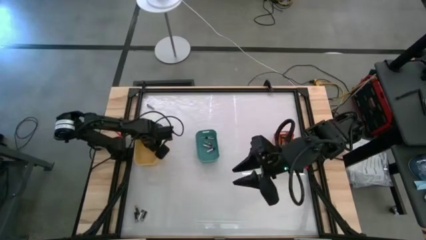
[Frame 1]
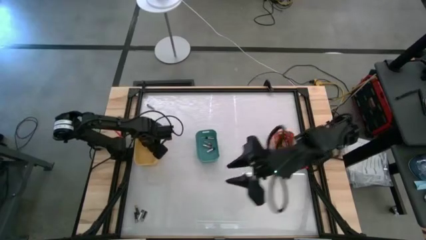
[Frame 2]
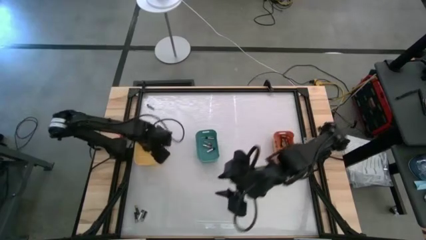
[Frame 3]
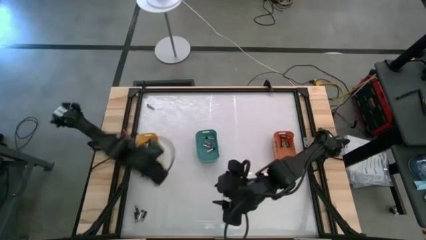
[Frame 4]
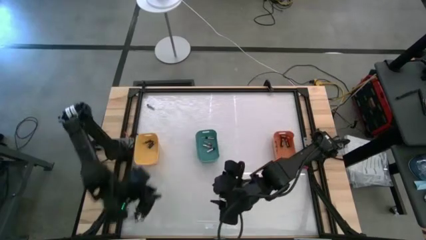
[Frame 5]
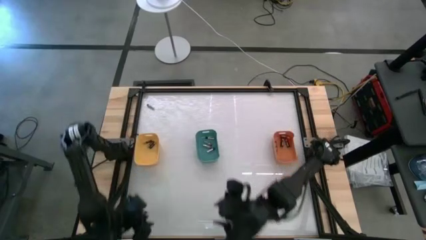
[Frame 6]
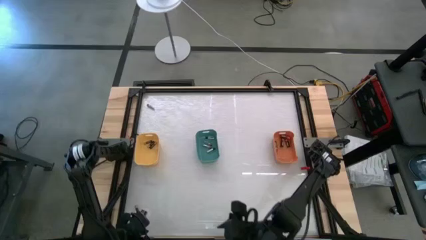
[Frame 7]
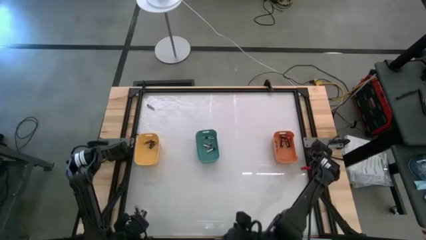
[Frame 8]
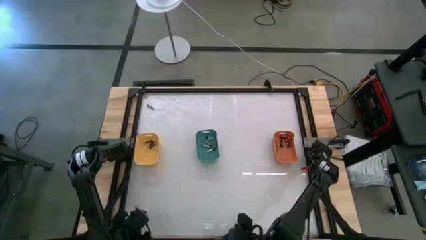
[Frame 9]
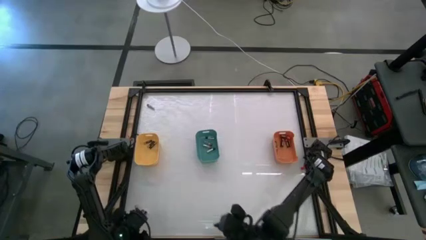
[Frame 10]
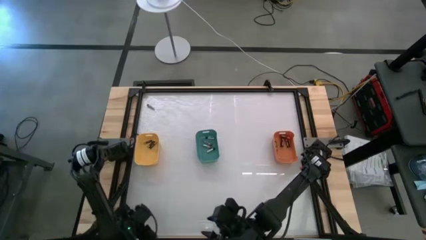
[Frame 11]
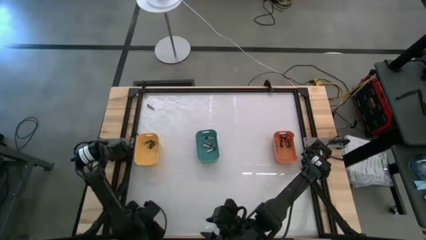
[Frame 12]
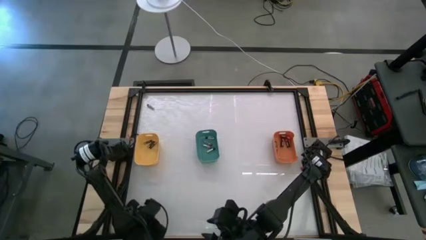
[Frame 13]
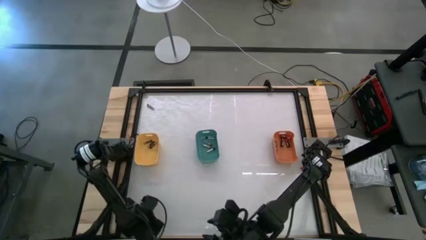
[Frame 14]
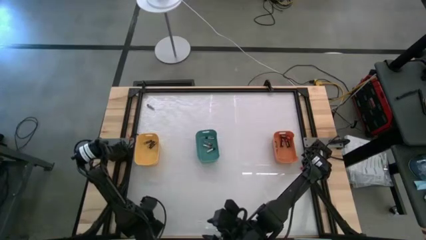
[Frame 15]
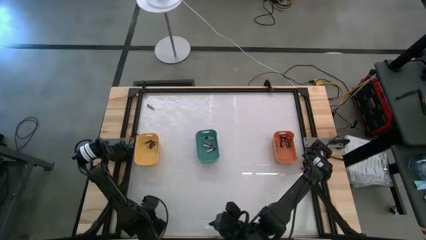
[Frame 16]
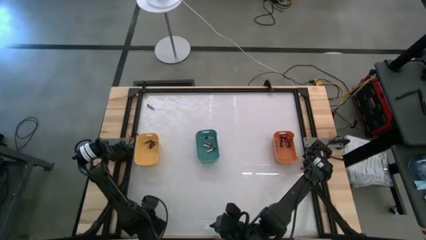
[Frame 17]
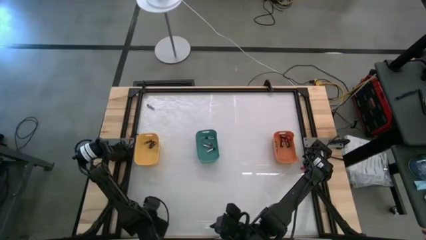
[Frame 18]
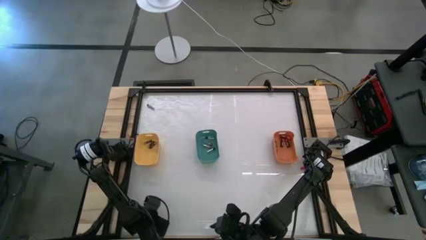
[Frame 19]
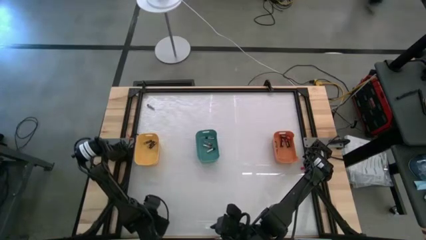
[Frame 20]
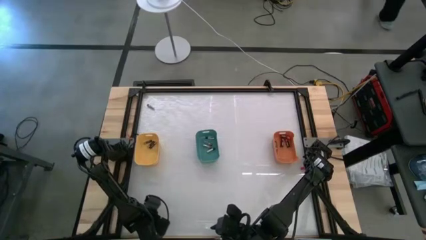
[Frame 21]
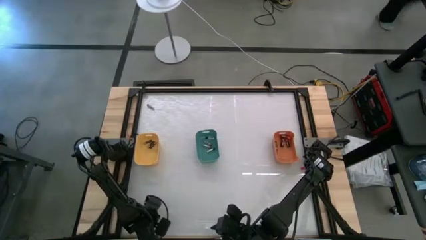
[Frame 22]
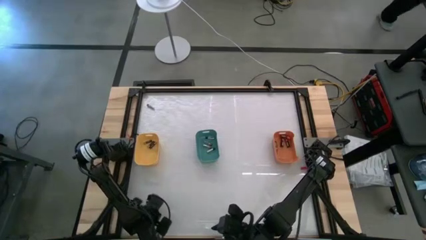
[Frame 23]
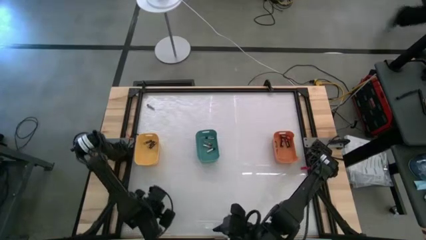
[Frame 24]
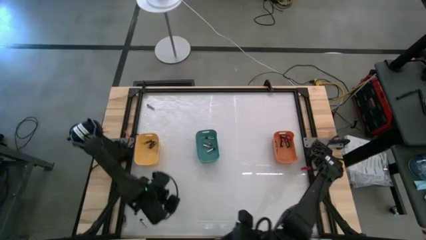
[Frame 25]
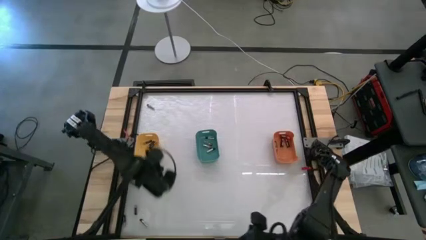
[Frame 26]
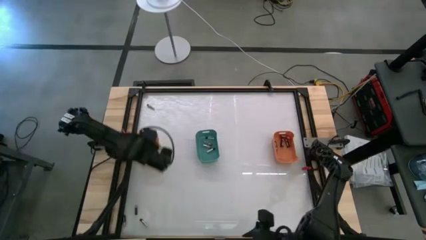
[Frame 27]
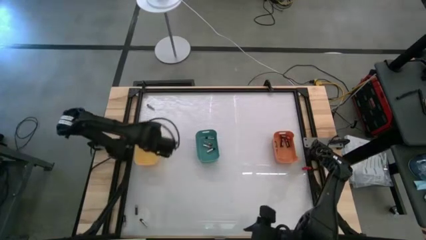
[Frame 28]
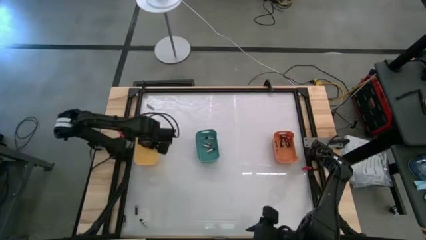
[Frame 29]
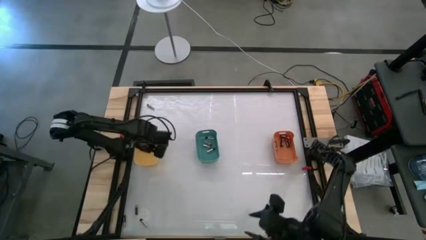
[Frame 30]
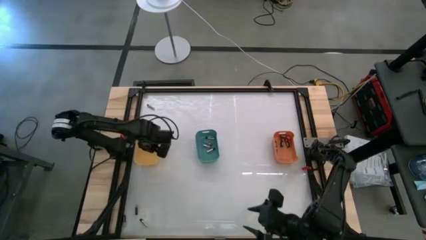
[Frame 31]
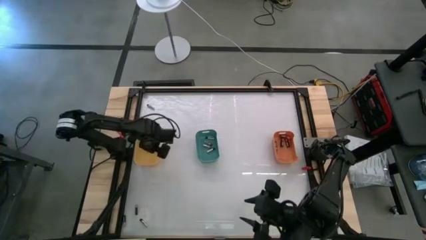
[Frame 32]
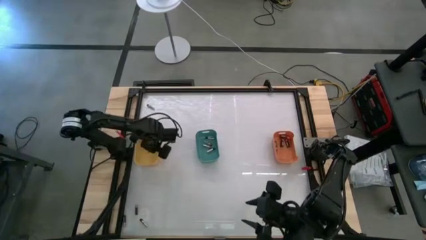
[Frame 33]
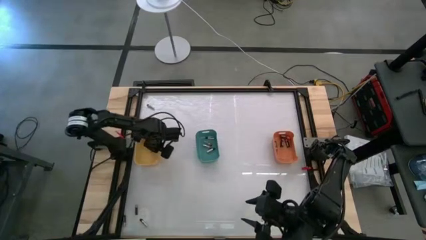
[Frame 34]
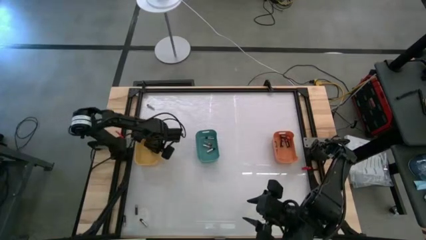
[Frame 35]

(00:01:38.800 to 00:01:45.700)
Task: Sort batteries
Put the black battery into the yellow bin

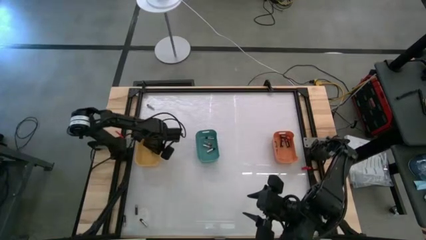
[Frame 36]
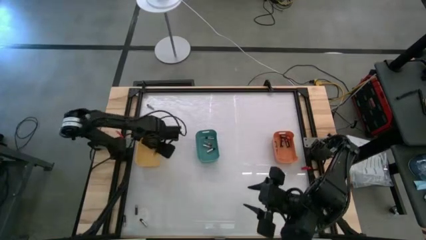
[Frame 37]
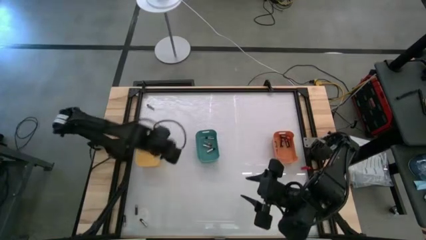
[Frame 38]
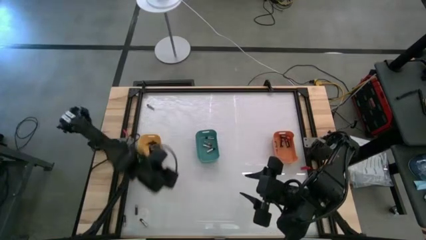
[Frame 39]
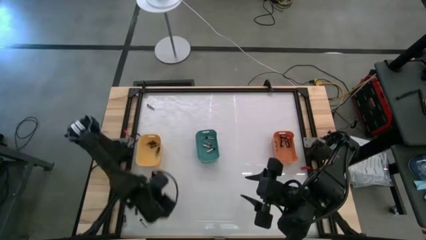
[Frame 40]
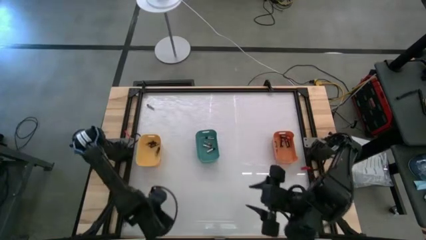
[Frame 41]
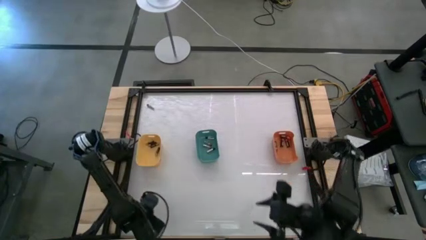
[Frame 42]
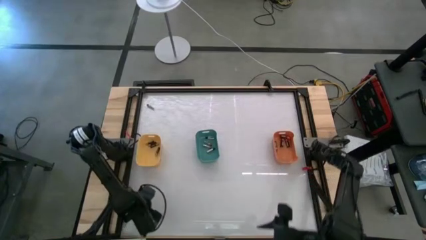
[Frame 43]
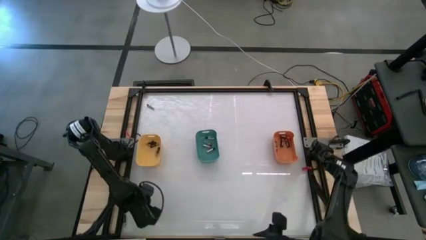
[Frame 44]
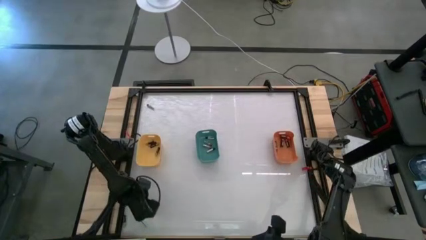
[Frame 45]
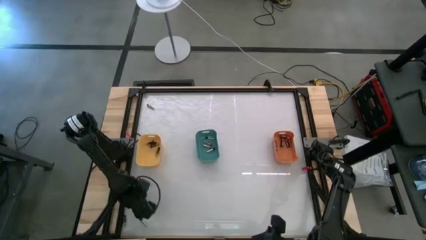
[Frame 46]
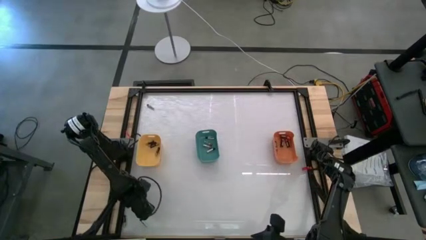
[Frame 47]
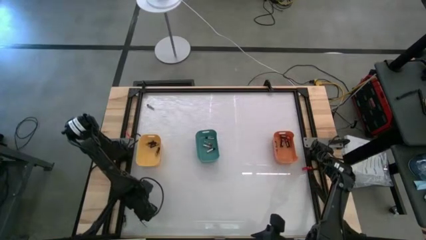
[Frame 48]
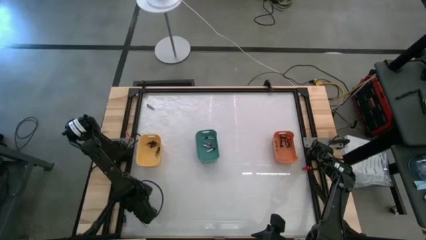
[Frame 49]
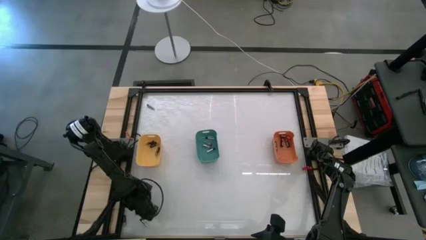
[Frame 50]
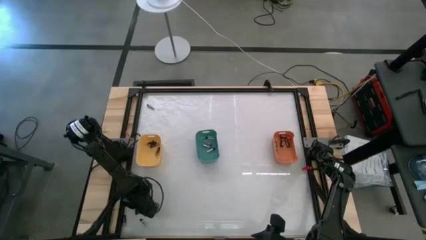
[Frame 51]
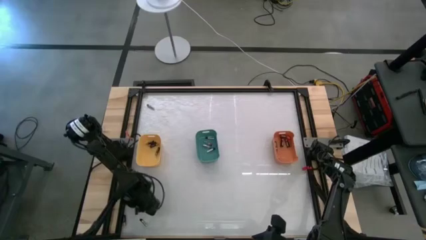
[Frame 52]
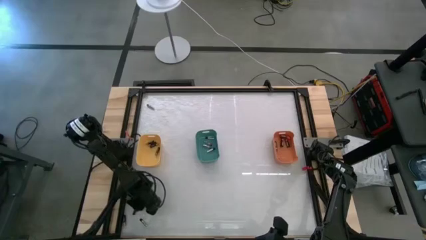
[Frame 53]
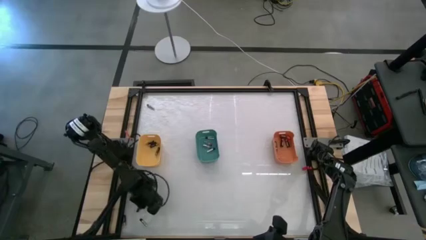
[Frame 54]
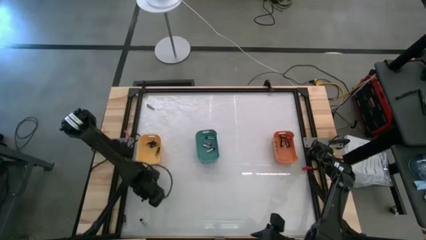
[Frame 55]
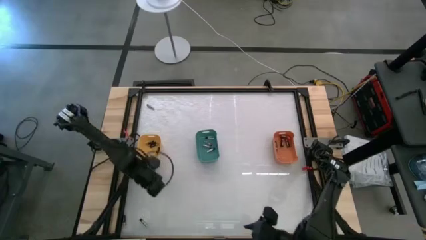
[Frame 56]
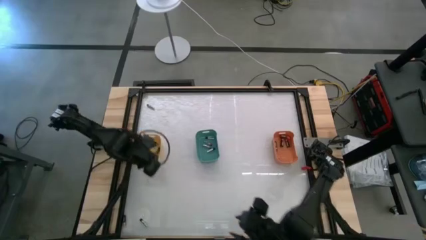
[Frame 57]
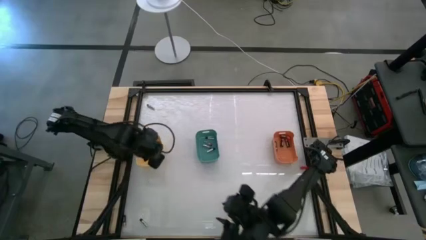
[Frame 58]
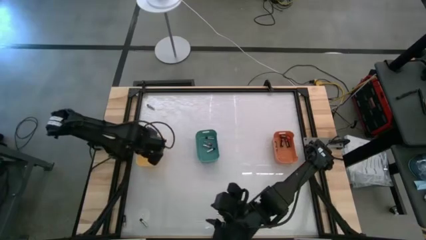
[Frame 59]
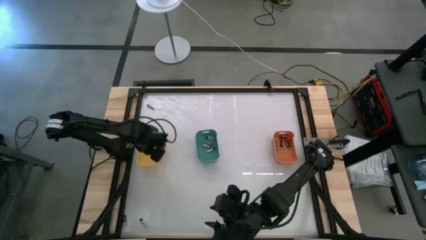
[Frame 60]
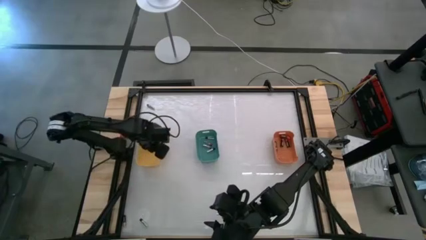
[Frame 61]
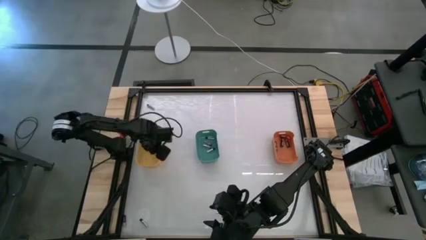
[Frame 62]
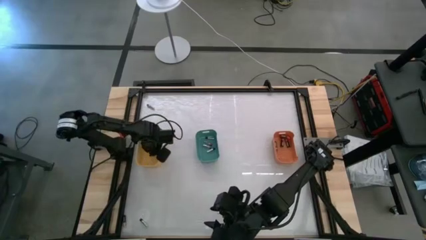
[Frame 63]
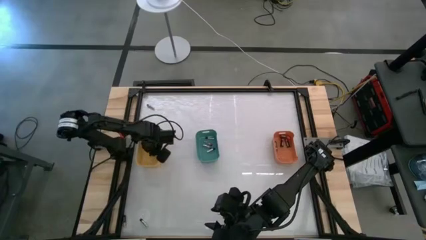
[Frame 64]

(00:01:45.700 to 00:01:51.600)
Put the black battery into the yellow bin

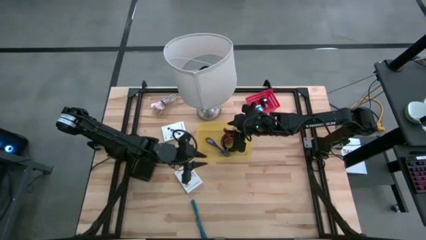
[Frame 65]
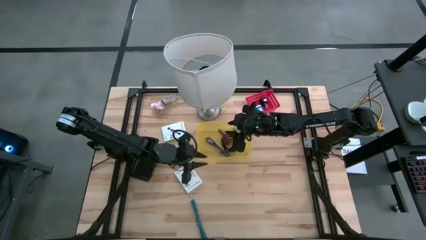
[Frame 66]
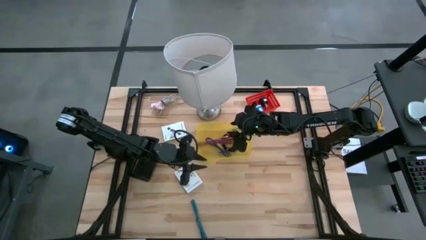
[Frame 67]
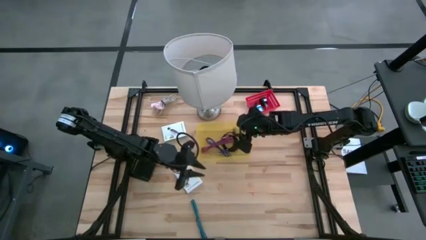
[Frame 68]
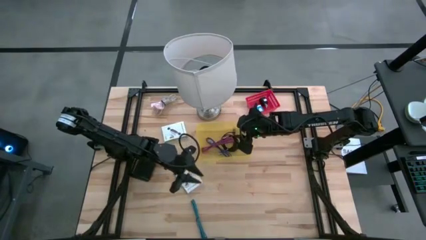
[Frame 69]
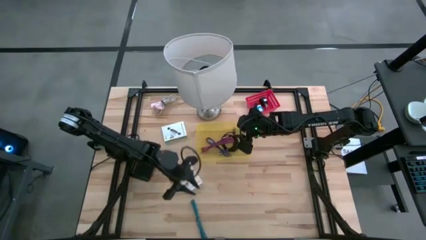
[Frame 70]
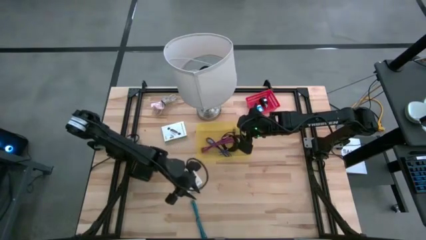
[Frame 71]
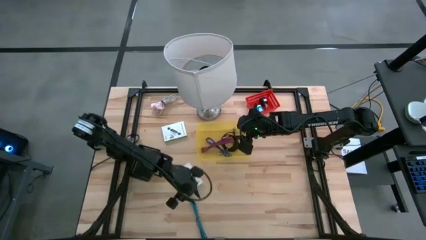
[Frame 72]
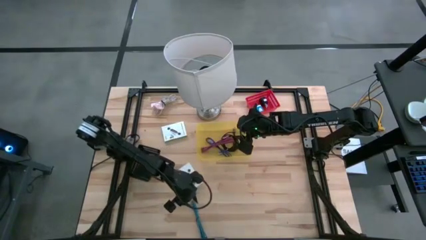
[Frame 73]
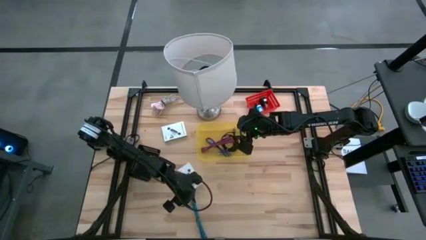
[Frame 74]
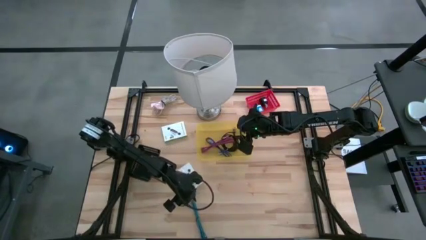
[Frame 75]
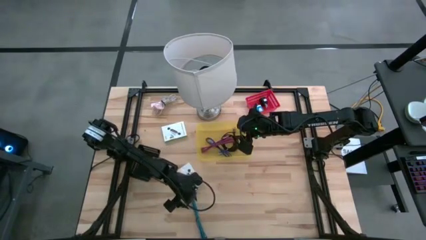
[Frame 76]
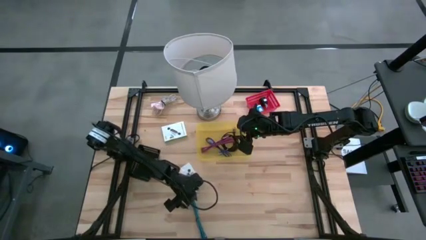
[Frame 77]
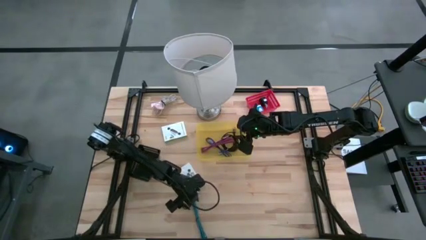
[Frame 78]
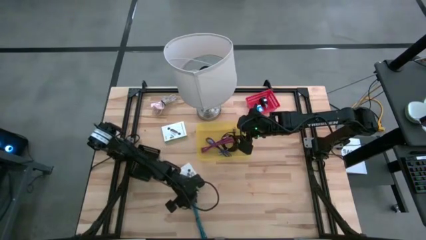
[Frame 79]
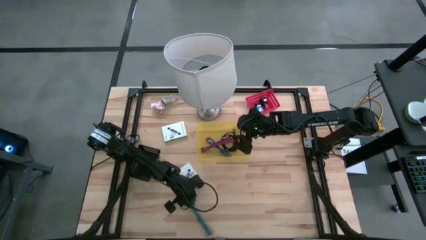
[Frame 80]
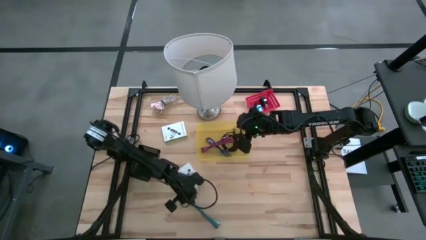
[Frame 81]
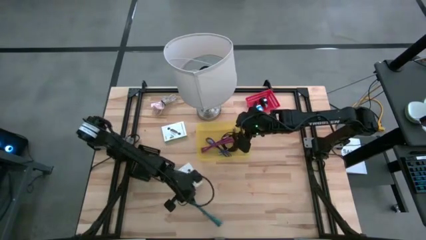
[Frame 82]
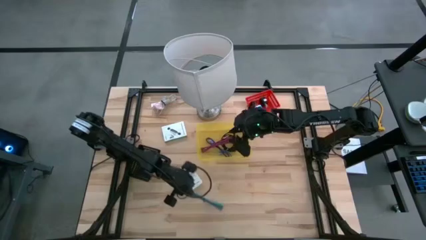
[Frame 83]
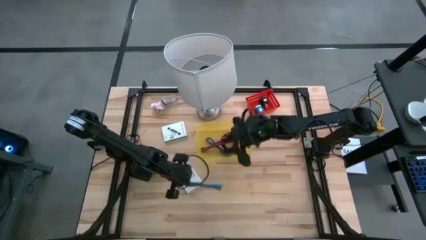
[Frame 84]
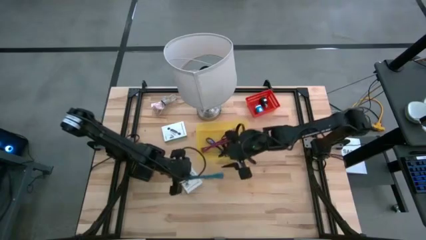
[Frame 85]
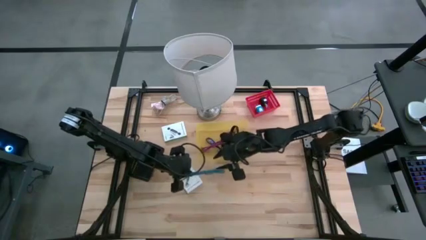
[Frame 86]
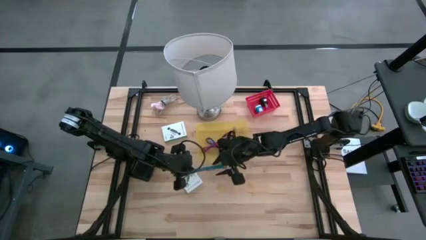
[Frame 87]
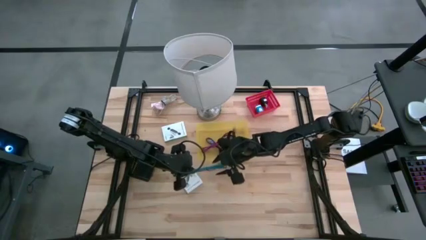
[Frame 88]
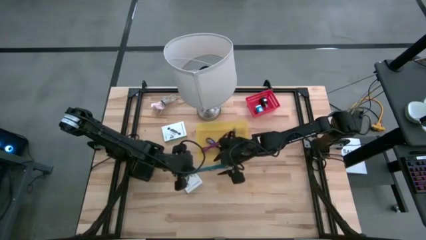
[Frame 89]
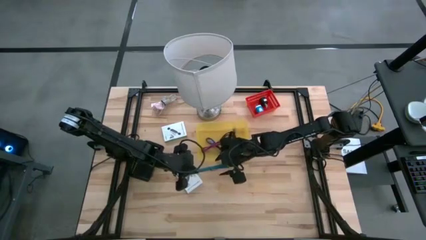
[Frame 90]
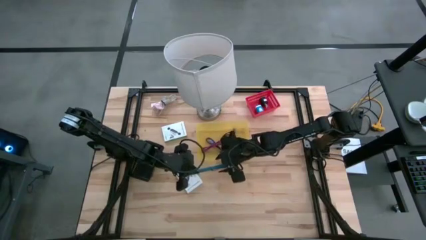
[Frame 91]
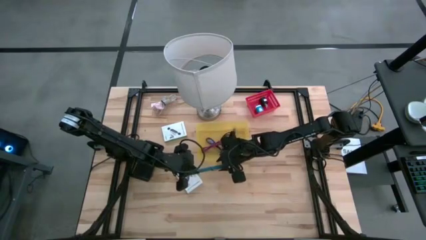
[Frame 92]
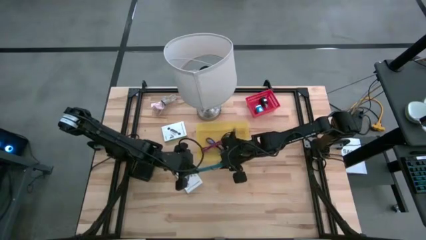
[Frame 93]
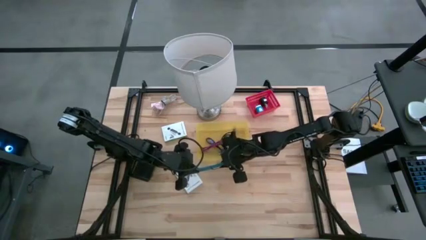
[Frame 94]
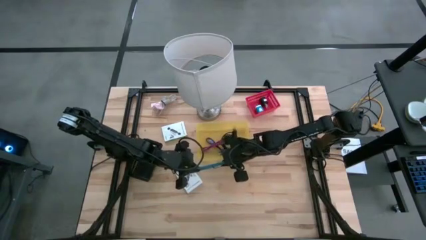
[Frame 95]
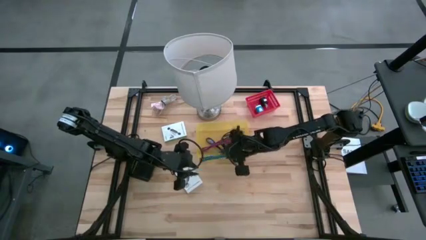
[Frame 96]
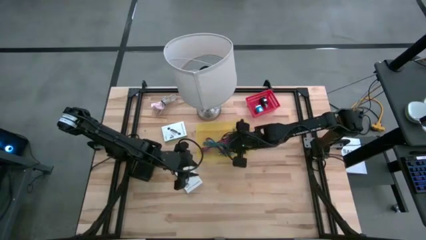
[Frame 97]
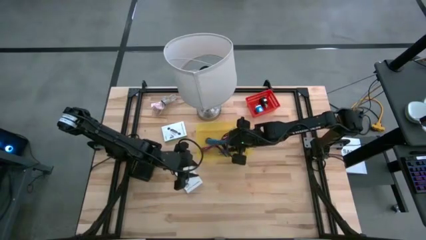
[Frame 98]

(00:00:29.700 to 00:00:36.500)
Task: Pick and place items into bin
Put the blue USB cable into the yellow bin
